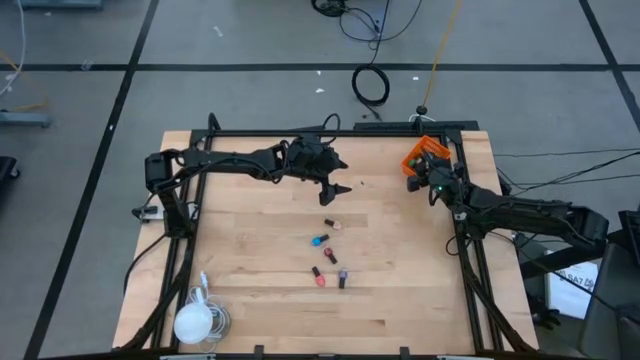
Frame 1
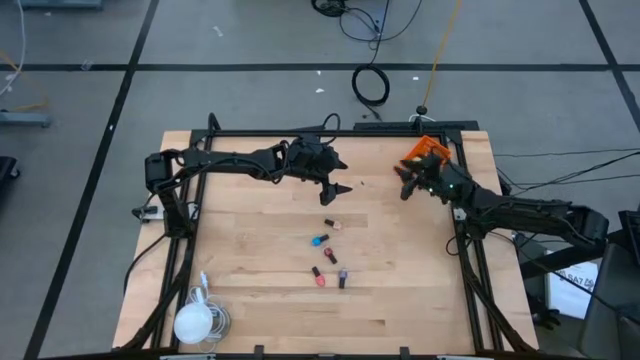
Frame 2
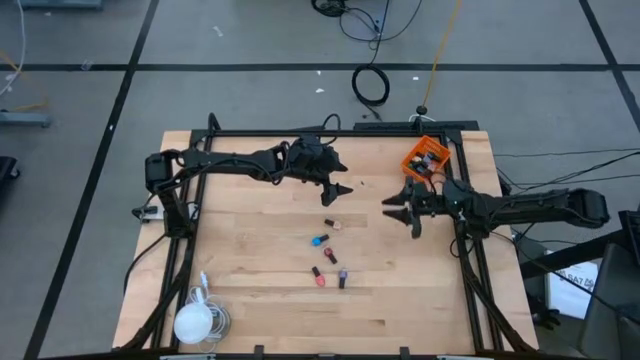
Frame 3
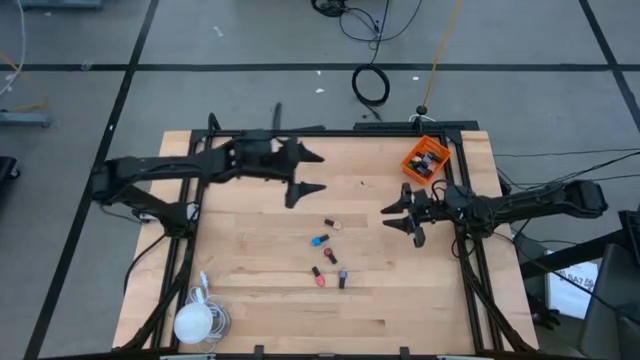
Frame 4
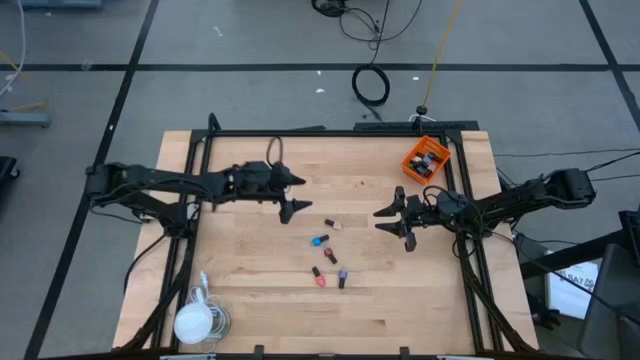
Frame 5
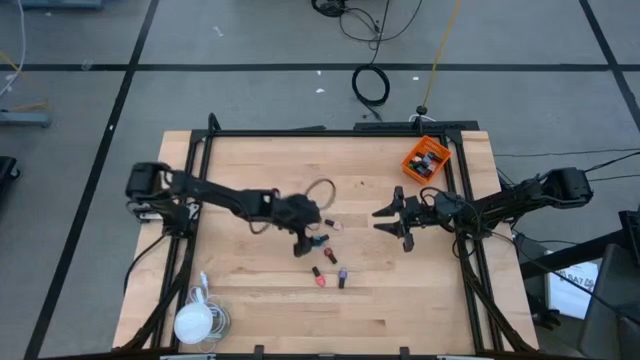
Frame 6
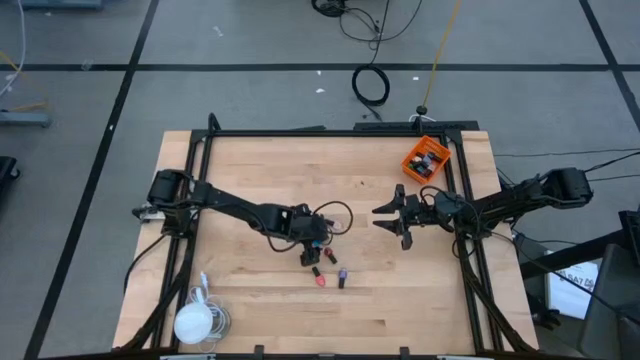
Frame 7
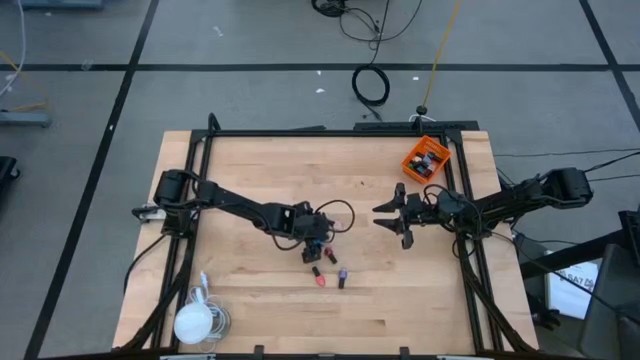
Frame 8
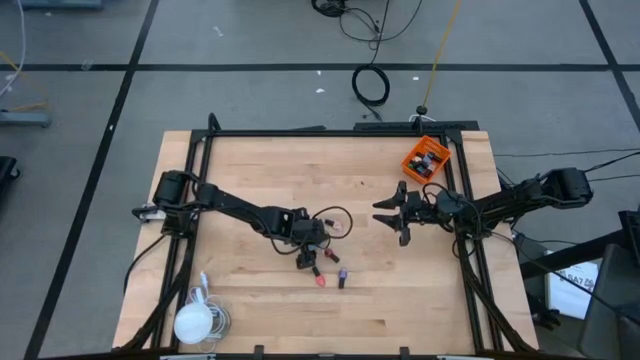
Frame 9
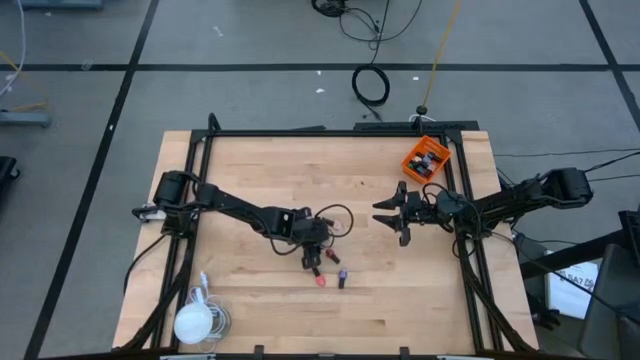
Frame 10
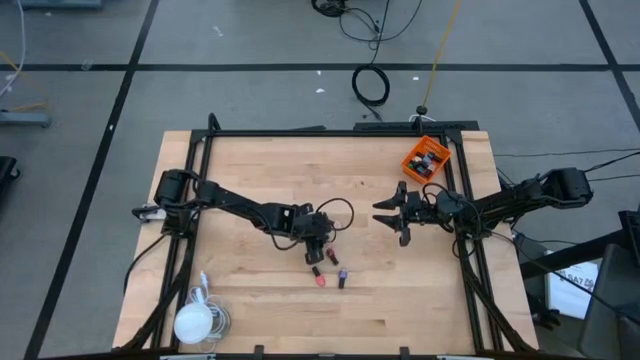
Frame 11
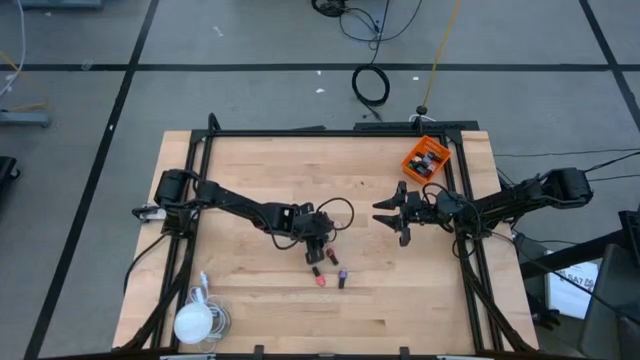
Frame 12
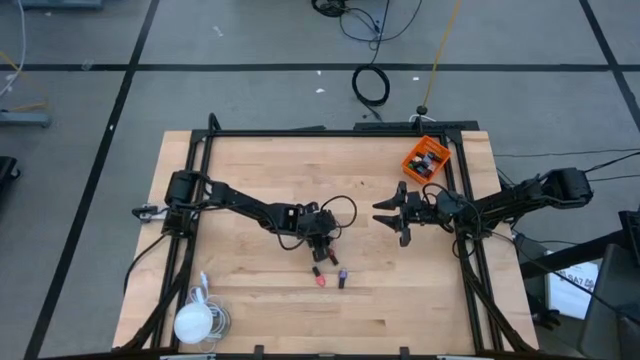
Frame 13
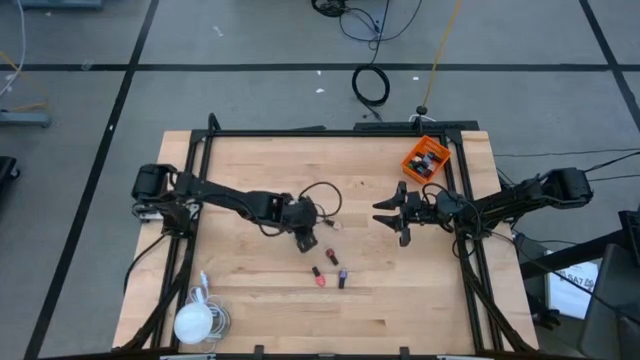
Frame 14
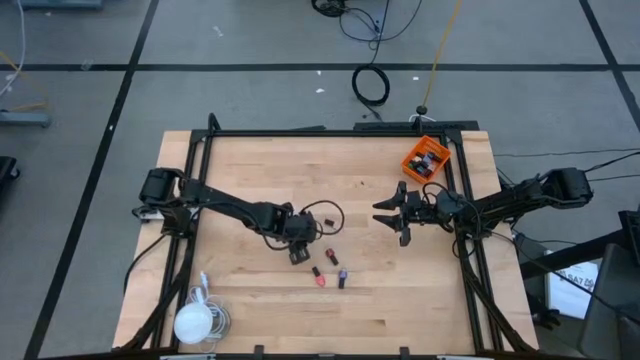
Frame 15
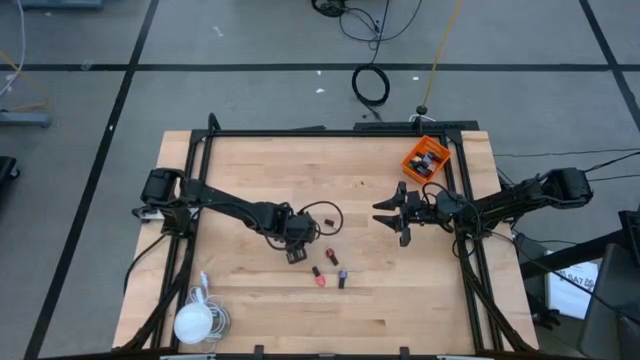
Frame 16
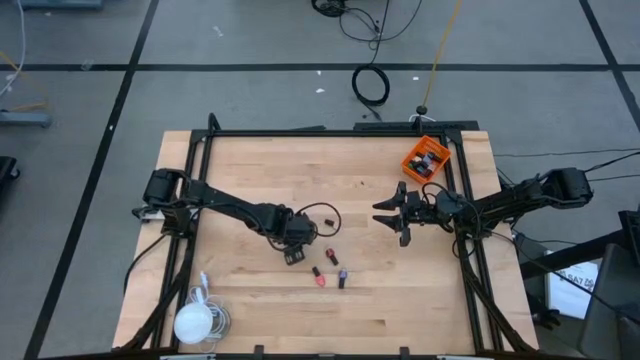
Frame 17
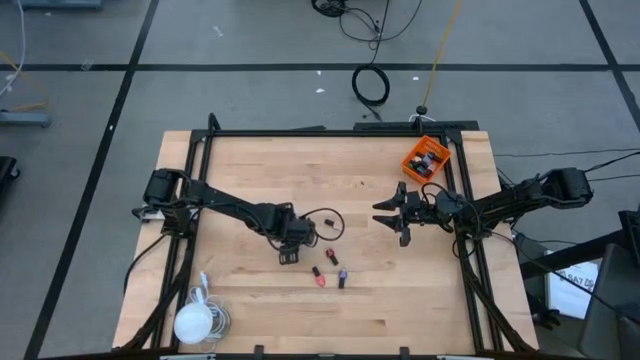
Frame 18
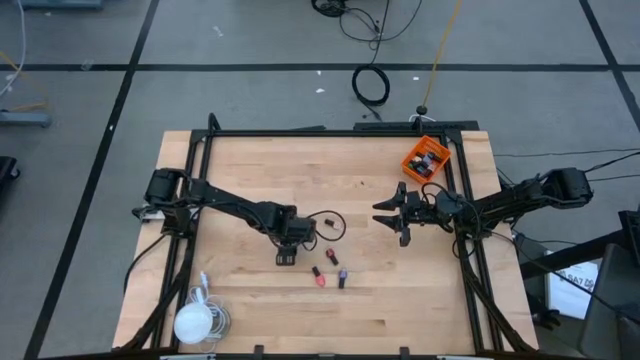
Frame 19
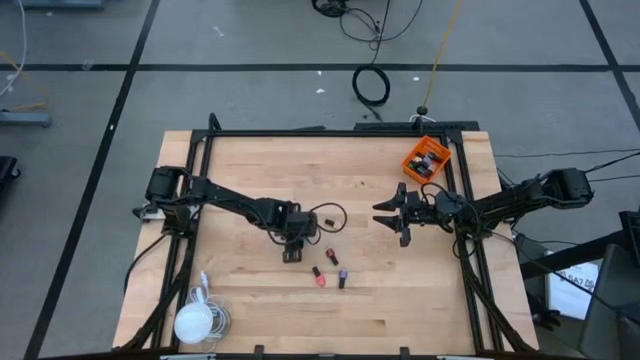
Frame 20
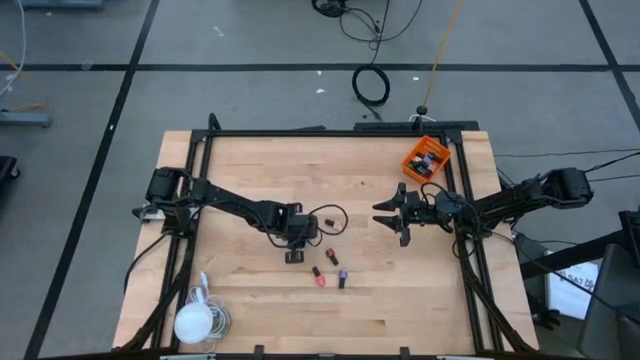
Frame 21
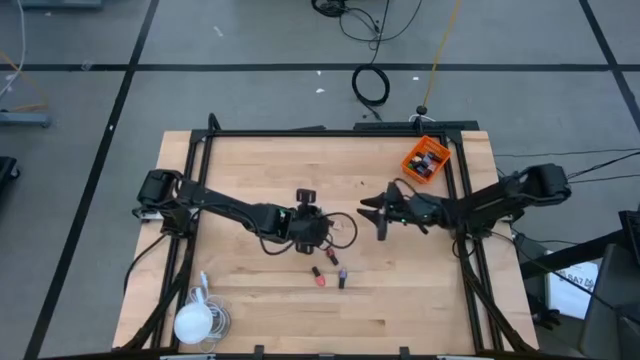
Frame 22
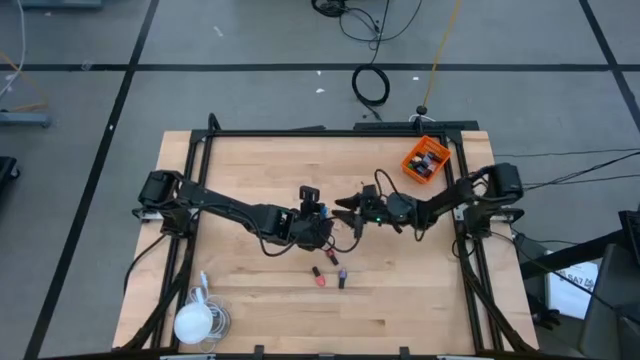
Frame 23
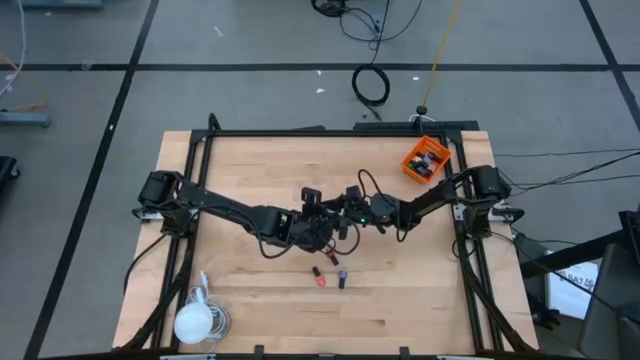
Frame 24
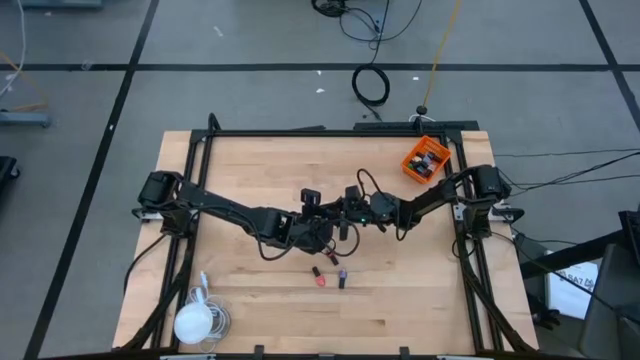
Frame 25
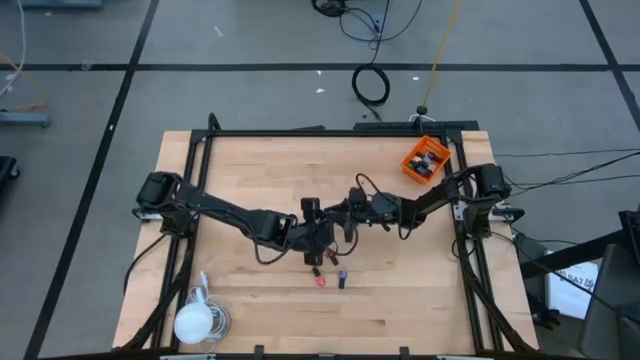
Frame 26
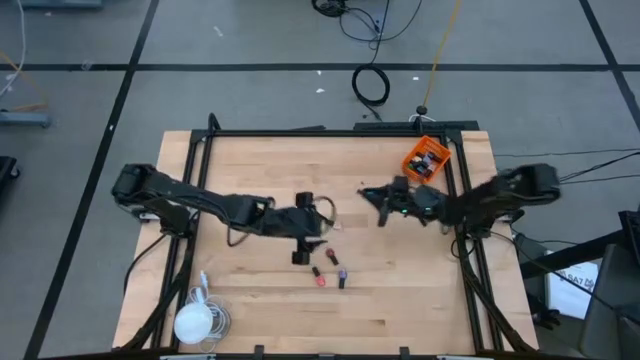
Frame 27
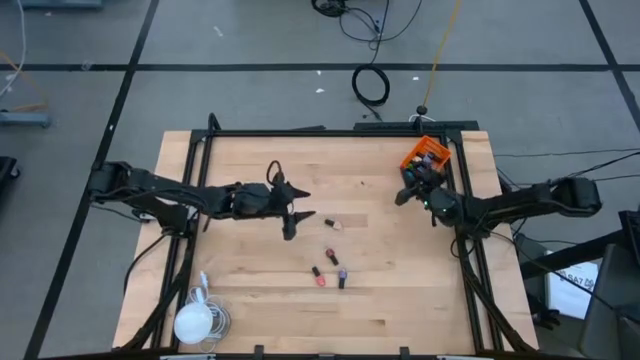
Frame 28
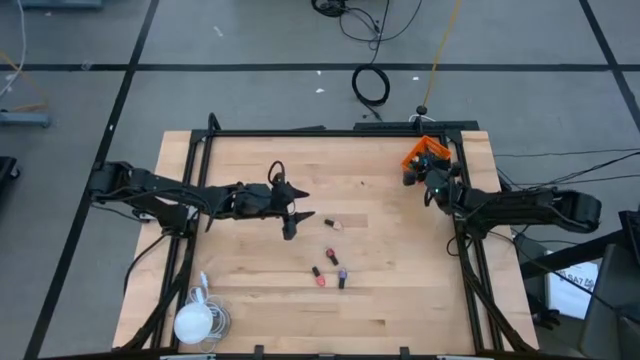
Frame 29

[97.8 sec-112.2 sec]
Task: Pick & Place Nail Polish
Put the blue nail polish bottle into the orange basket

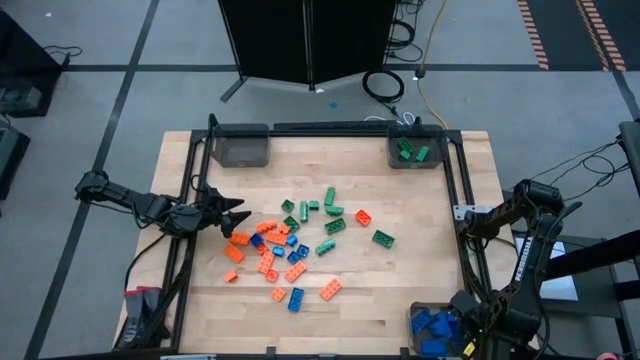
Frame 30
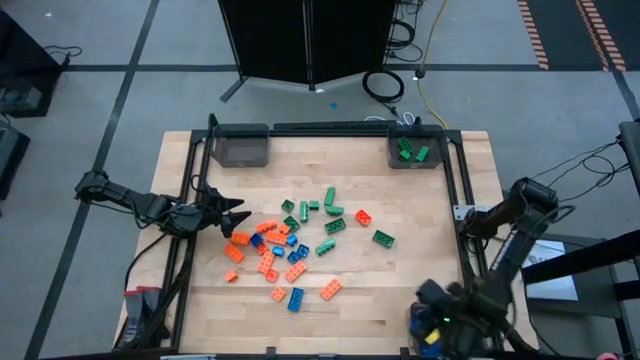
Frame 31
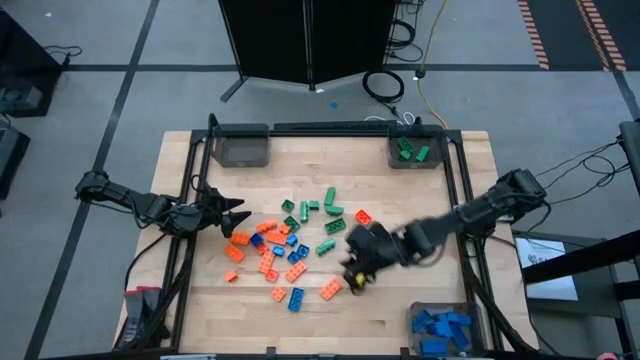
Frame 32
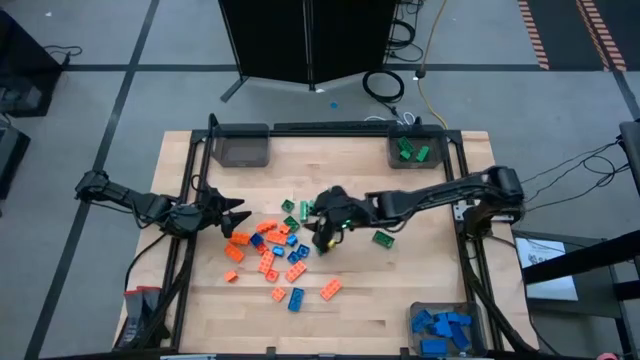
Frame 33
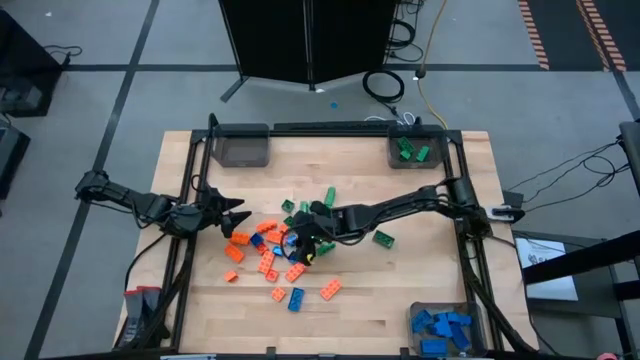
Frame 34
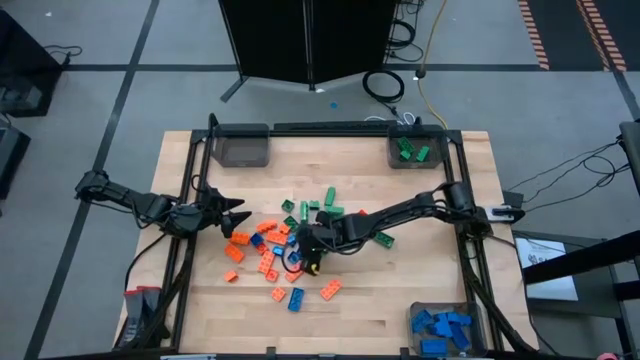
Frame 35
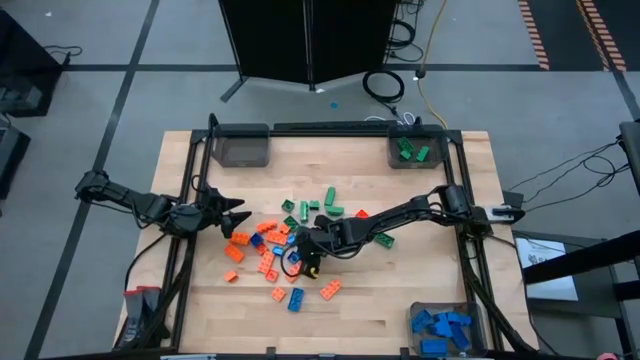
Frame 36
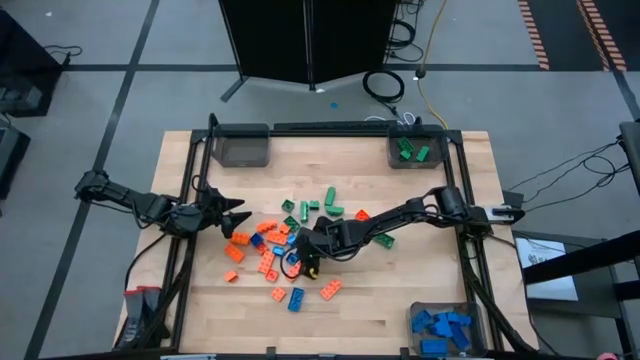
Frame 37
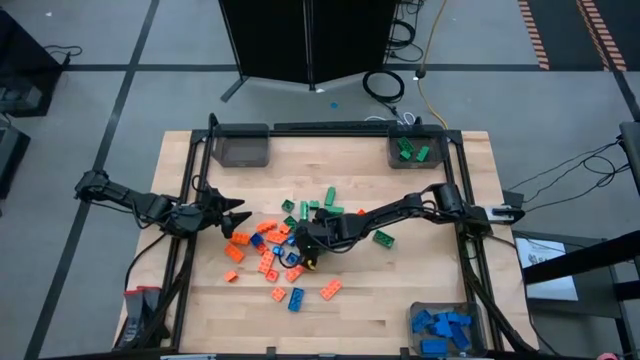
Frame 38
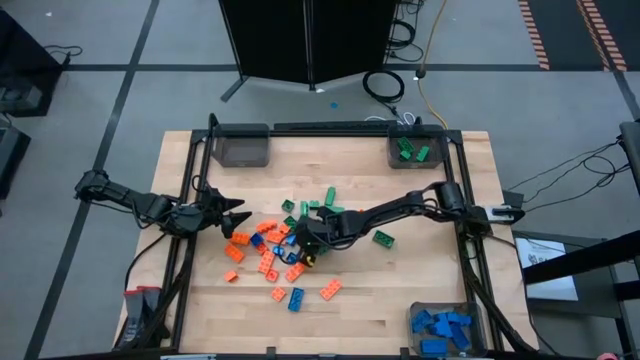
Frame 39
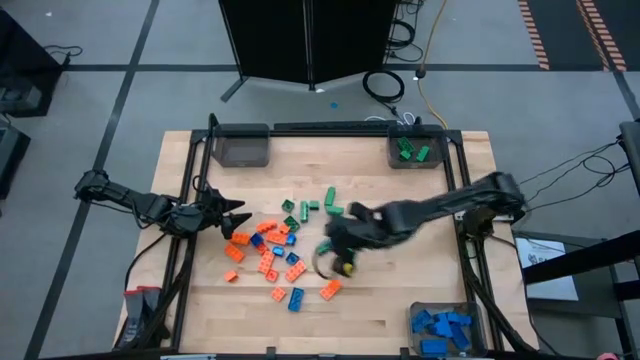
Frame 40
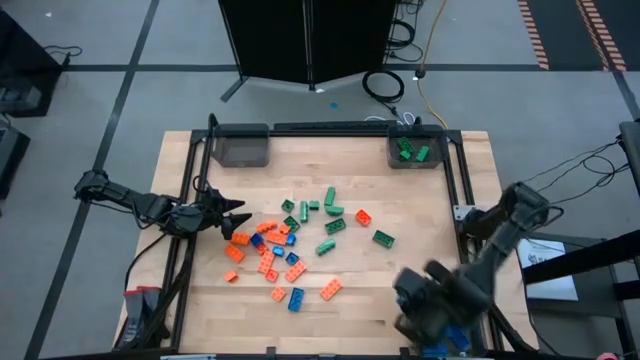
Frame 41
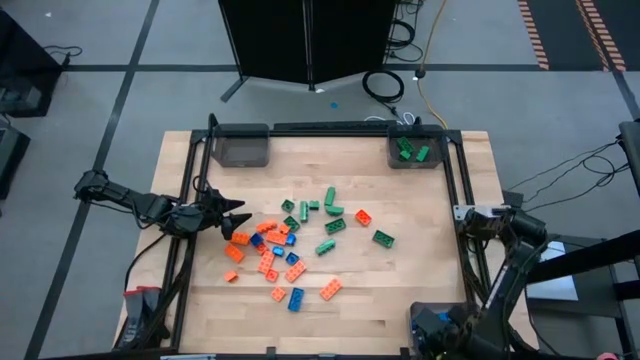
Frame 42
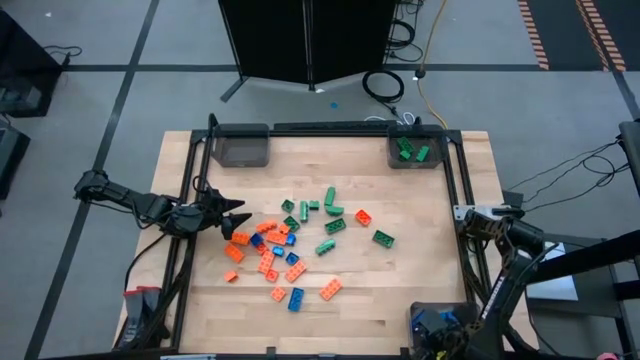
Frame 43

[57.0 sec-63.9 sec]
Task: Sort blocks
Put the blue game piece into the bottom black bin
